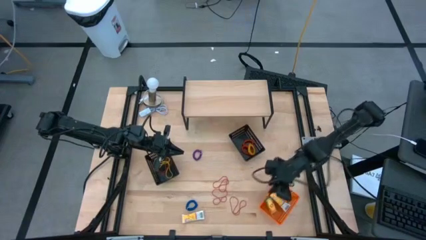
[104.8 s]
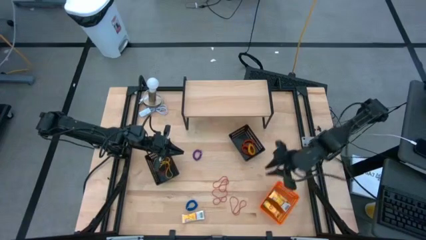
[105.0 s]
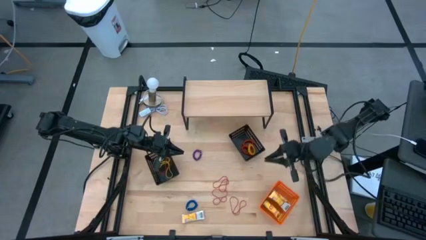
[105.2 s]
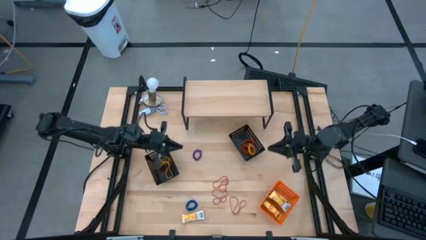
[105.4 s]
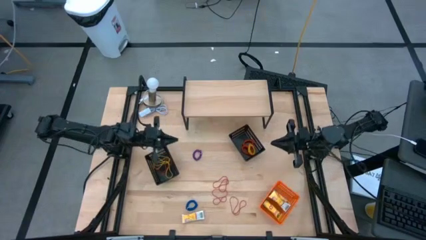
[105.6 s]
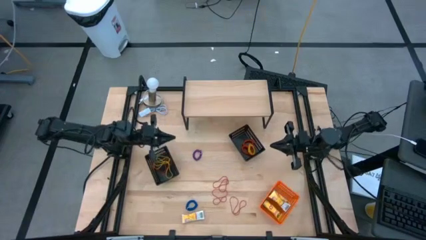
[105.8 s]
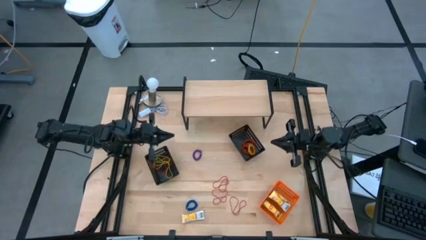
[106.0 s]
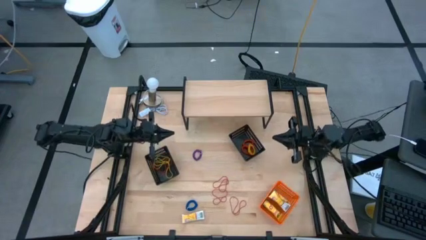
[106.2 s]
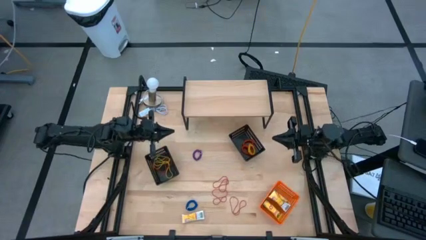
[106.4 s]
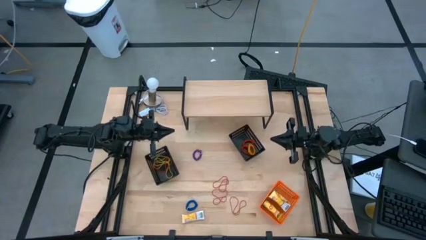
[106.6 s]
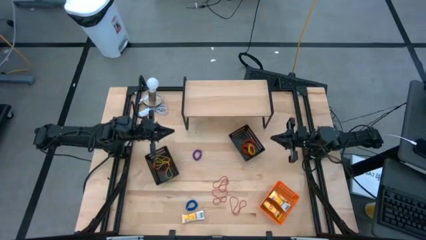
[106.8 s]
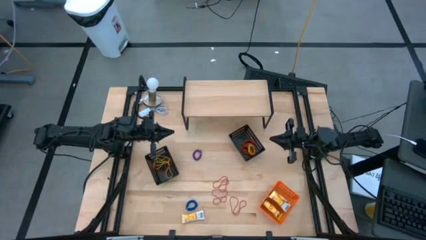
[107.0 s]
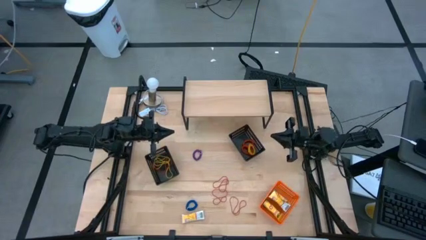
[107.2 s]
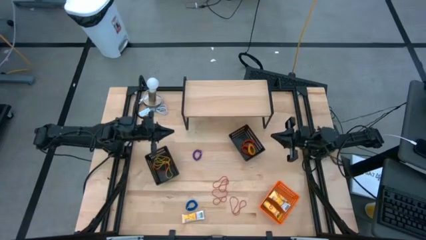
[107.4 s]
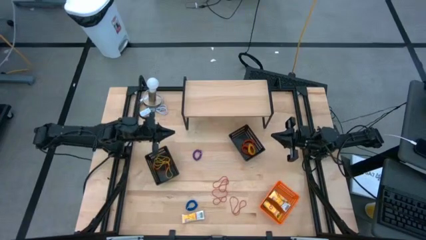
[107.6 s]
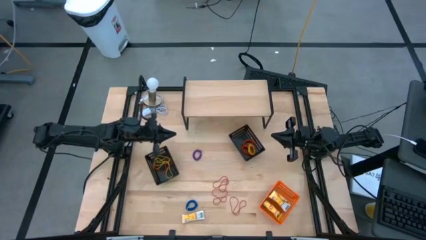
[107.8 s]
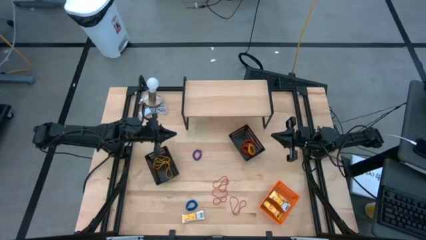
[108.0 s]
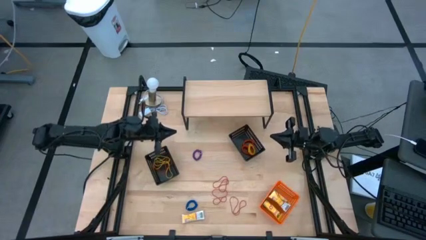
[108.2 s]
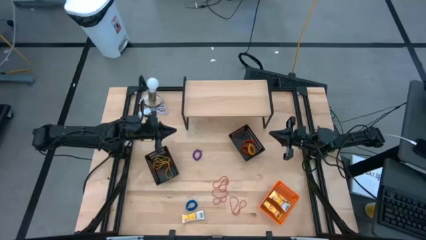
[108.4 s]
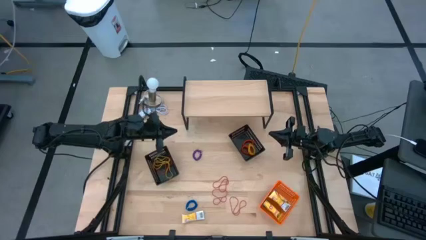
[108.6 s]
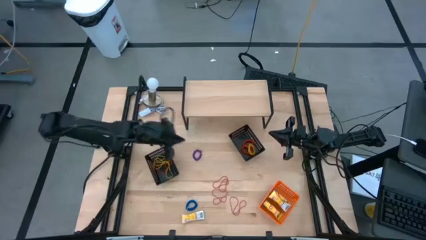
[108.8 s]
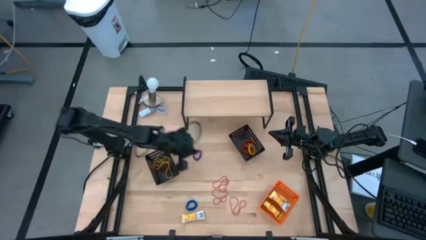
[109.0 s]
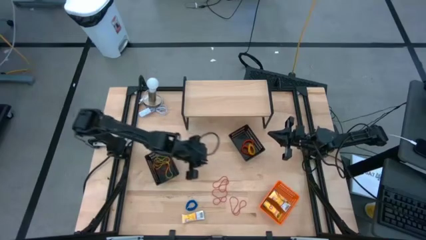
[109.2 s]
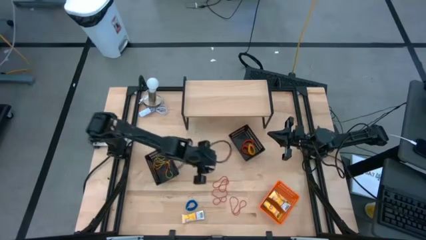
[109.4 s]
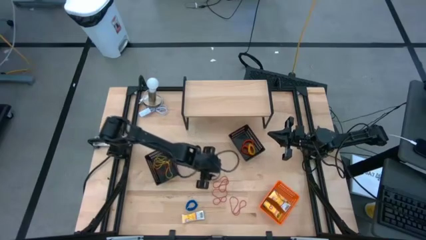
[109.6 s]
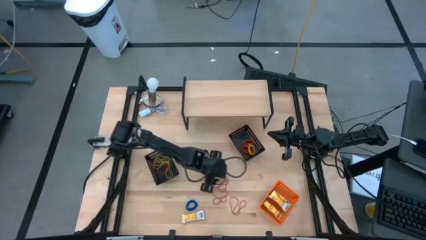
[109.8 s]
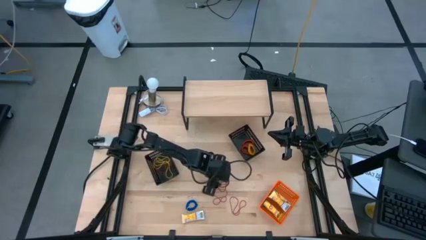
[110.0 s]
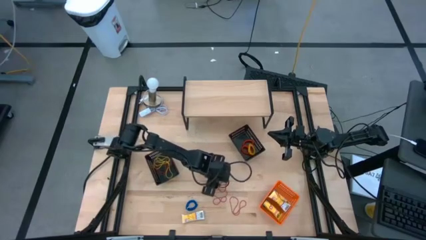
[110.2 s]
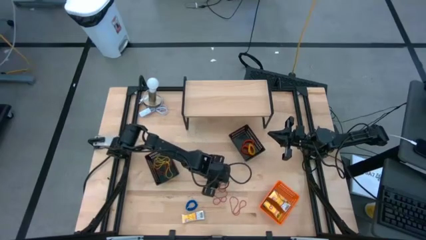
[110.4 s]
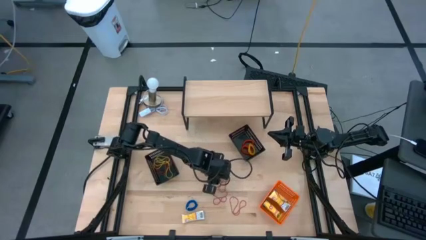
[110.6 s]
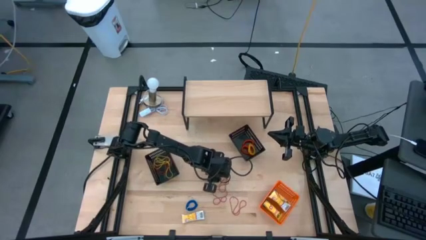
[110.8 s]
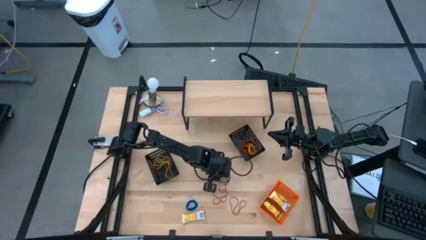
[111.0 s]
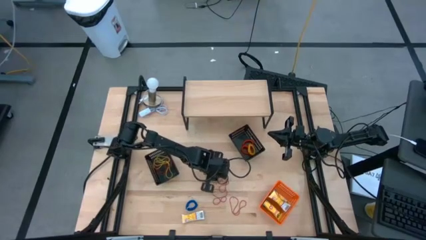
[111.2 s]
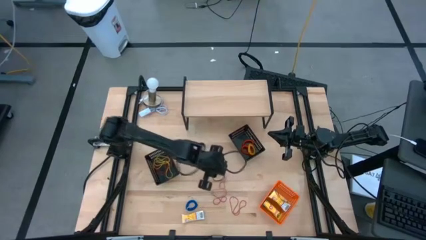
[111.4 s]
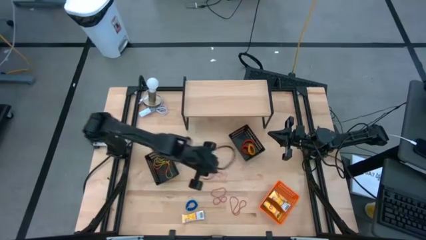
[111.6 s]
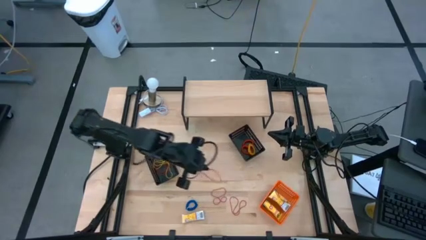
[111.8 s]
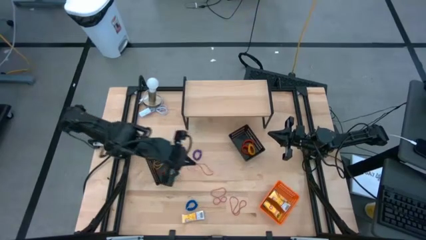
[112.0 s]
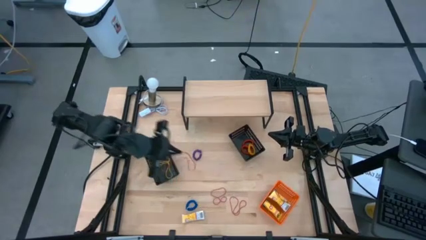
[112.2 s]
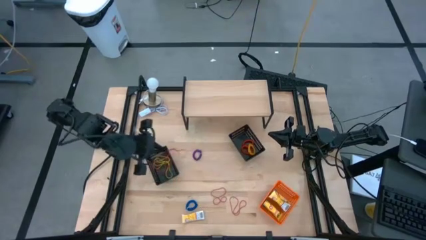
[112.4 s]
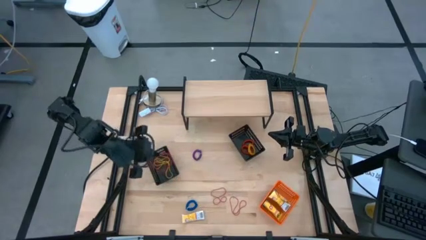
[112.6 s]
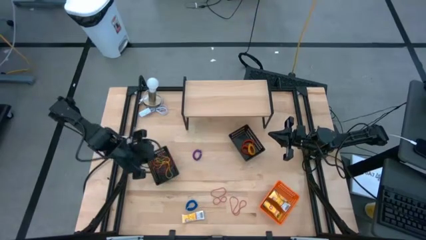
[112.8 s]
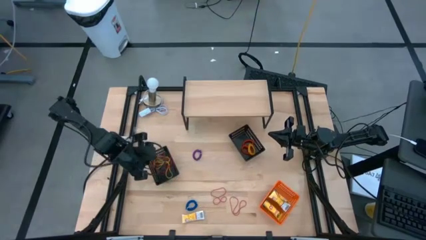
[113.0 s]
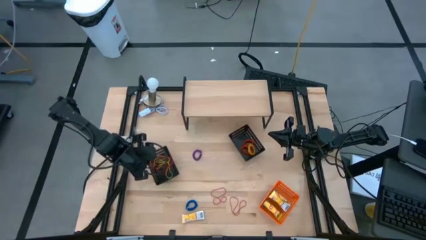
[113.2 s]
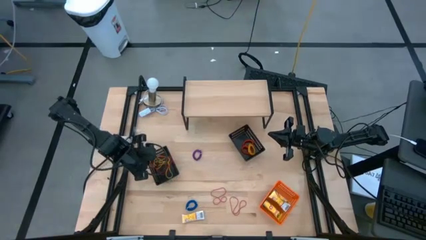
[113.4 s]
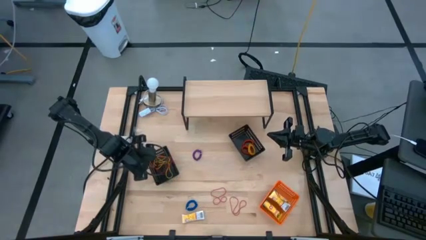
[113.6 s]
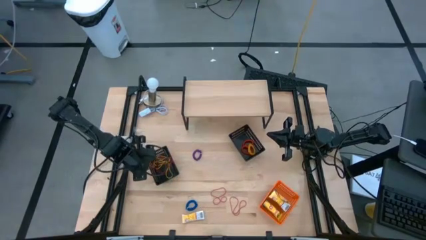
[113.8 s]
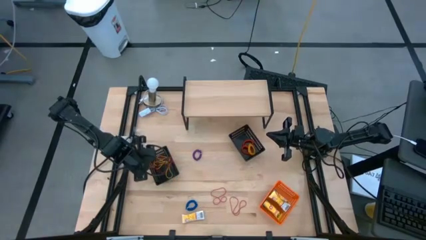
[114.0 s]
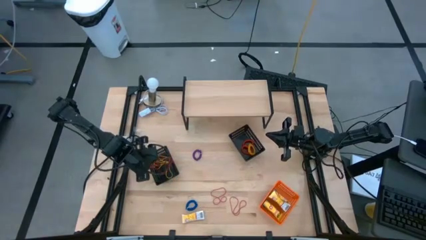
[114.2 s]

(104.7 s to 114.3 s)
Task: Pick & Place Office Desk Supplies
Put the red rubber band into the left black bin
